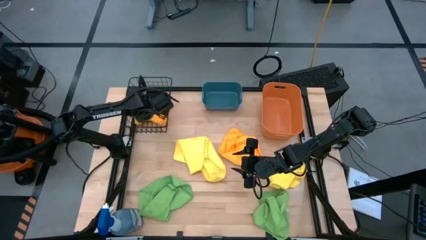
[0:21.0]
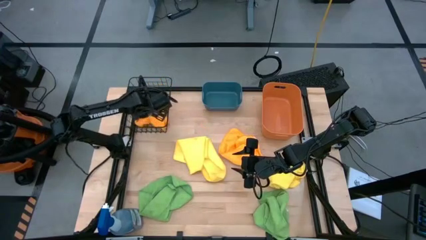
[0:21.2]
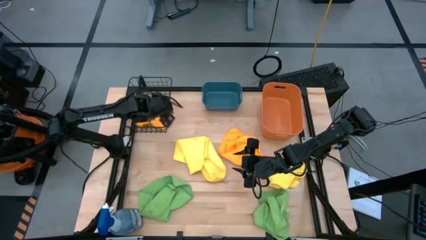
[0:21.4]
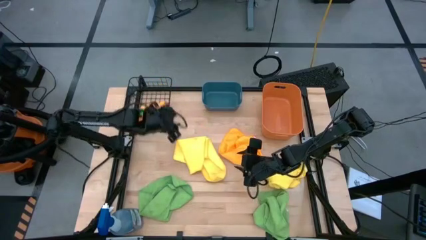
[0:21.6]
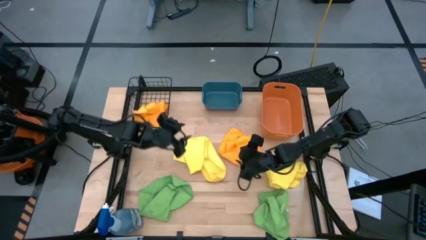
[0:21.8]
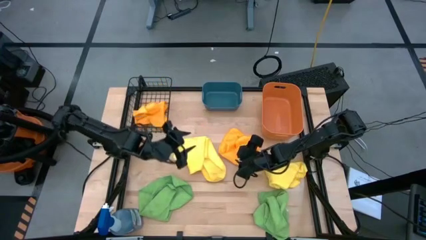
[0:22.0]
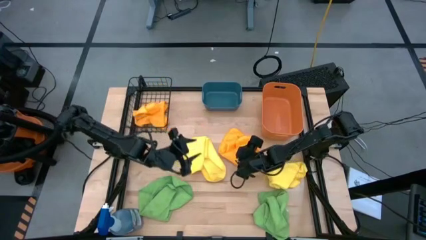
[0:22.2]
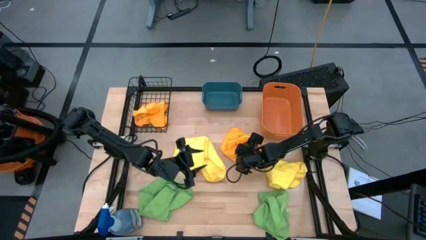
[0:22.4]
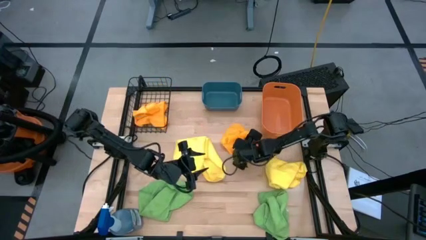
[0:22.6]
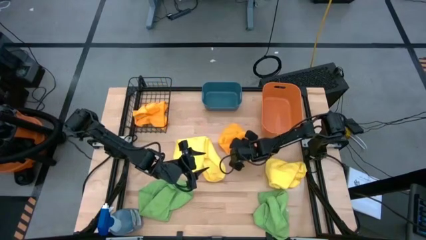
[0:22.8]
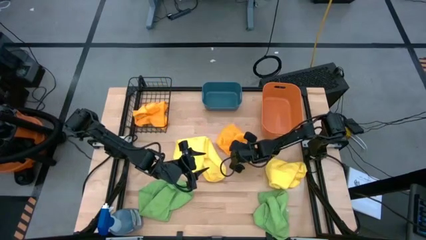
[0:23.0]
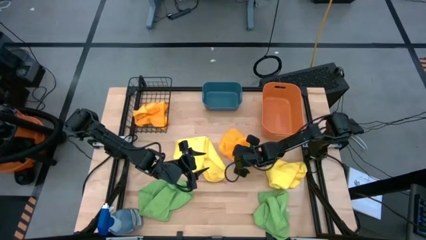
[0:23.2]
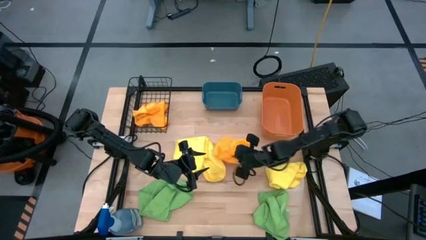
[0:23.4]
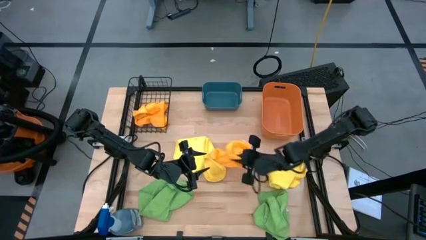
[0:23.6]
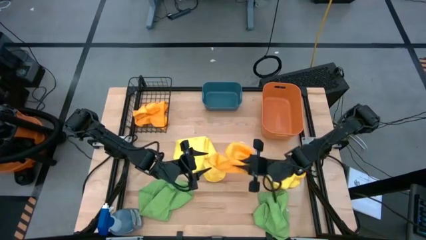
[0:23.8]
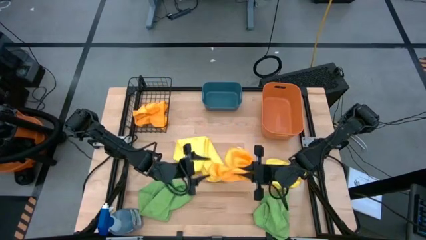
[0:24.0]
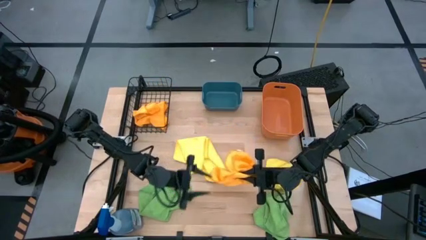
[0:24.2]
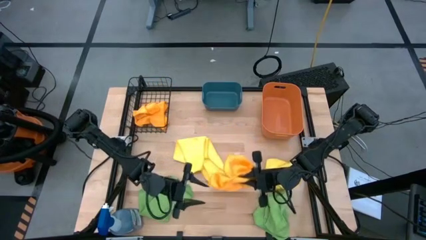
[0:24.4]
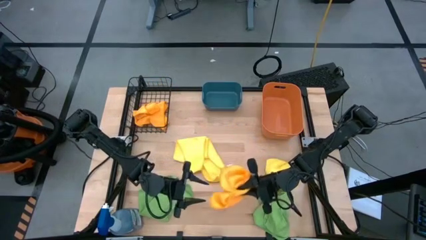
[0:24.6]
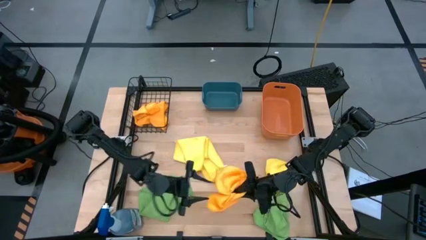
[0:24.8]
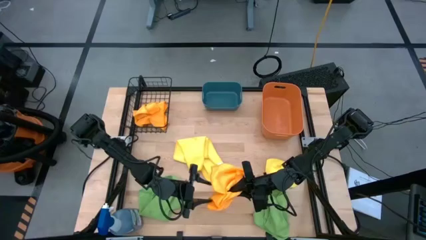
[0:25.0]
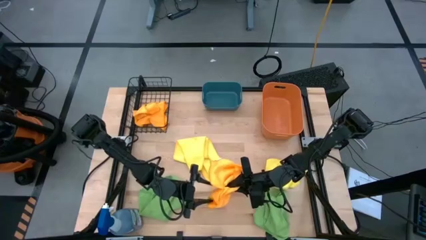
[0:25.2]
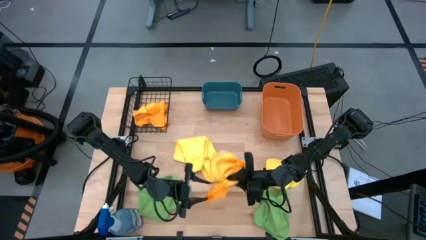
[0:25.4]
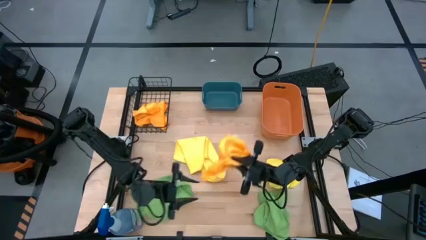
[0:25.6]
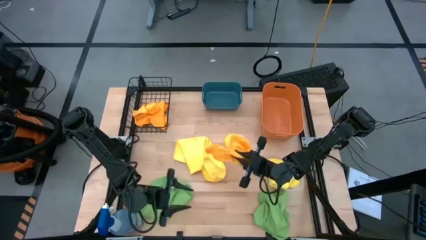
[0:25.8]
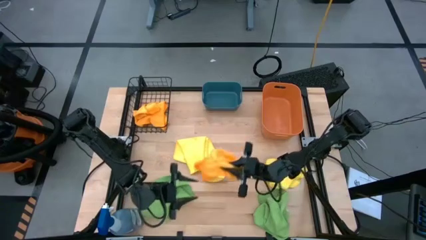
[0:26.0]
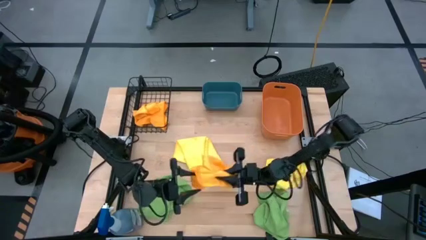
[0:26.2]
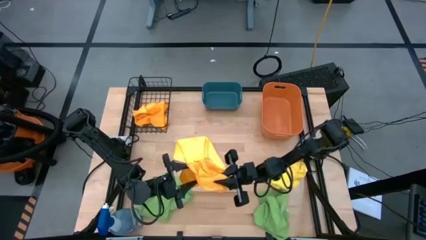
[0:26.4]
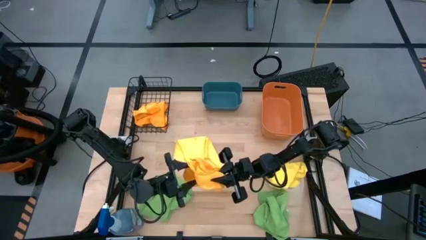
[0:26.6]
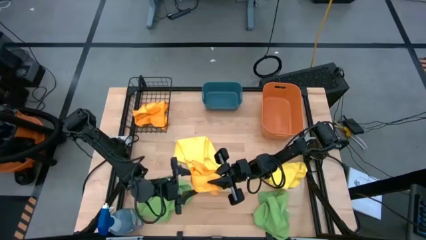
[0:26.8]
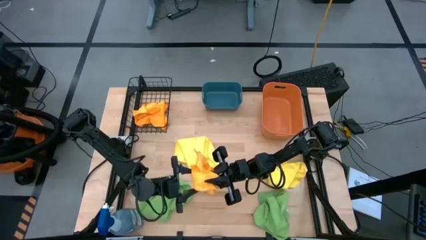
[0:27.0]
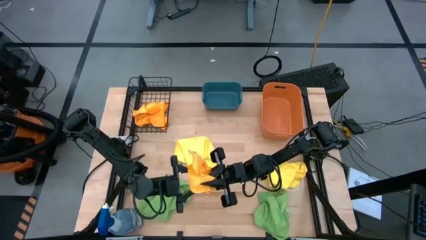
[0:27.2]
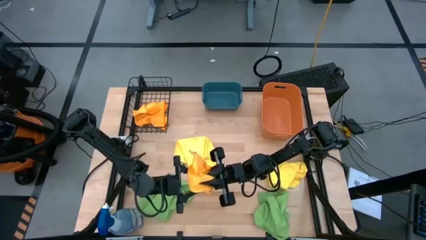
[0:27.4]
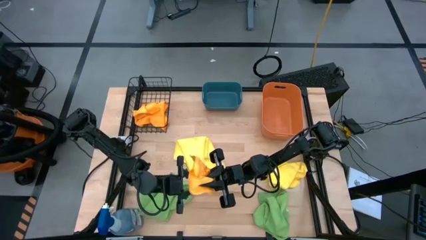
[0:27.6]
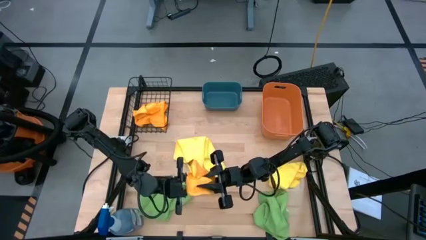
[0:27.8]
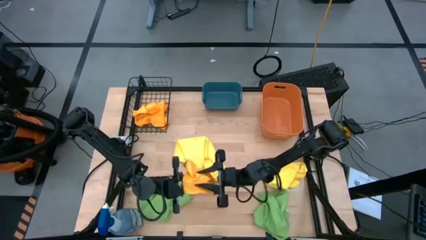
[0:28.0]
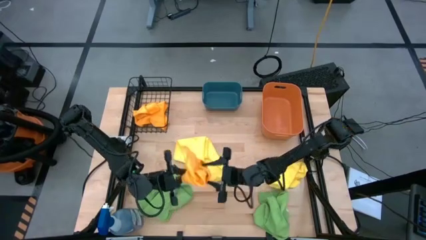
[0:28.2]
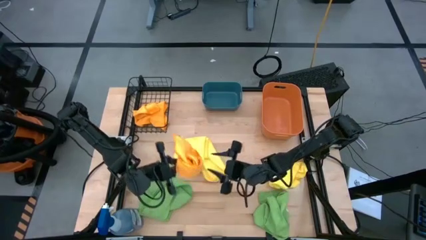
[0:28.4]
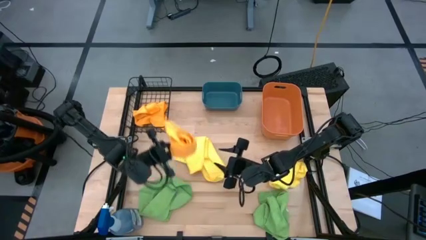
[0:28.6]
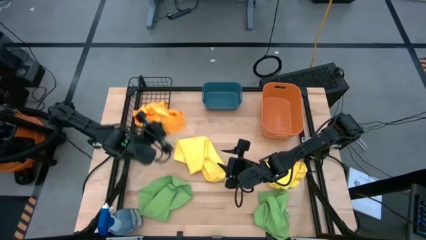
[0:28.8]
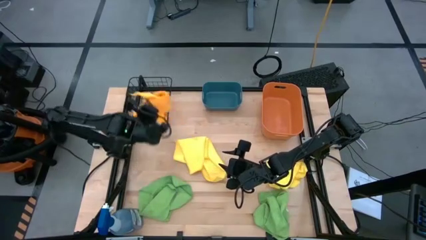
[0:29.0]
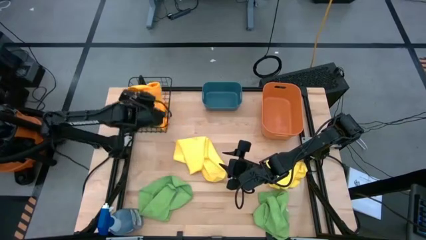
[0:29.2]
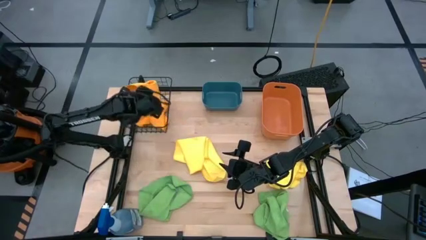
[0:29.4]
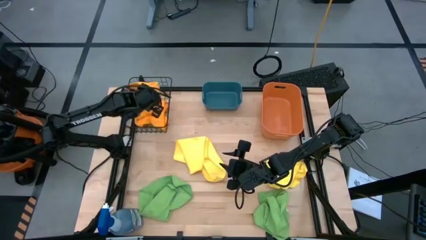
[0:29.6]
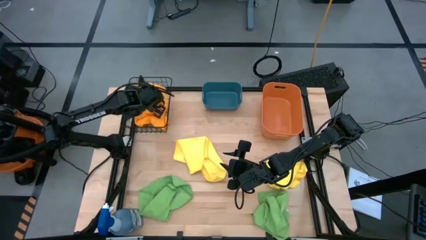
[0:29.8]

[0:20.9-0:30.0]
Task: Sort microfiber towel by color & place in baskets
Put the orange microfiber cloth into the black wire basket

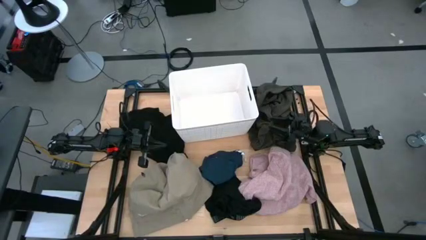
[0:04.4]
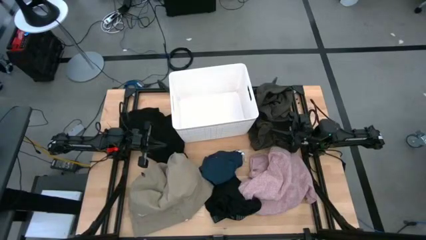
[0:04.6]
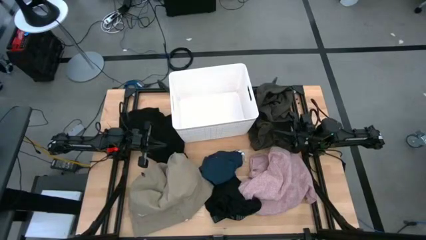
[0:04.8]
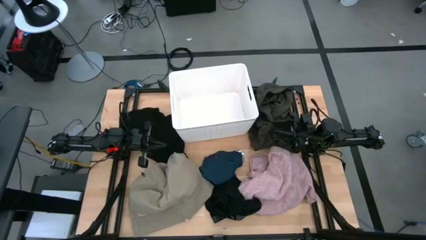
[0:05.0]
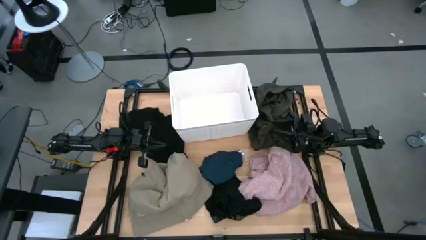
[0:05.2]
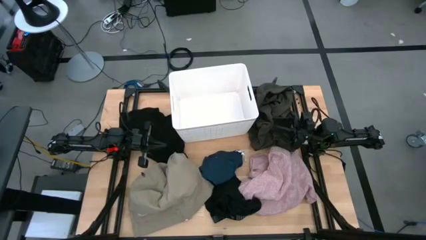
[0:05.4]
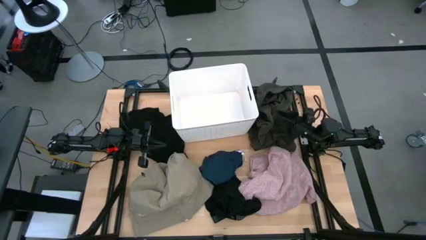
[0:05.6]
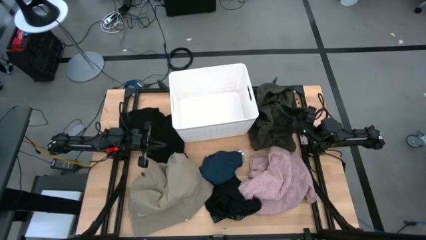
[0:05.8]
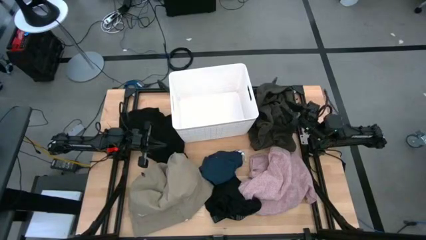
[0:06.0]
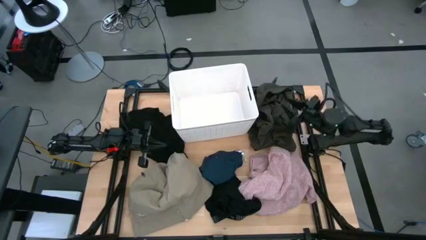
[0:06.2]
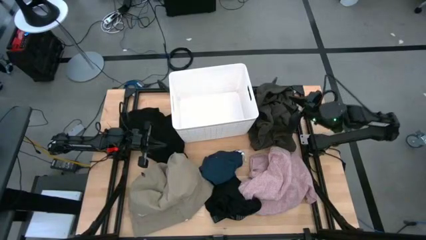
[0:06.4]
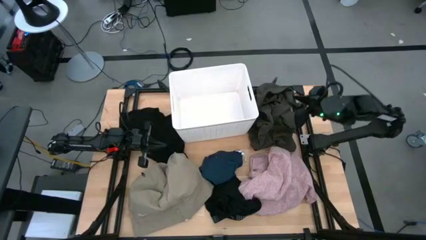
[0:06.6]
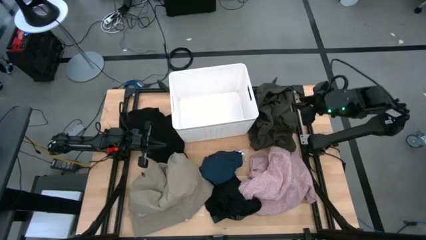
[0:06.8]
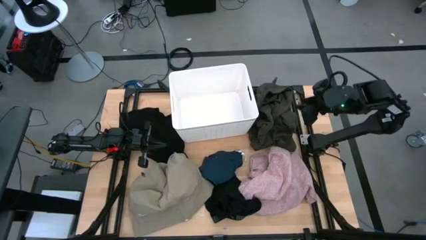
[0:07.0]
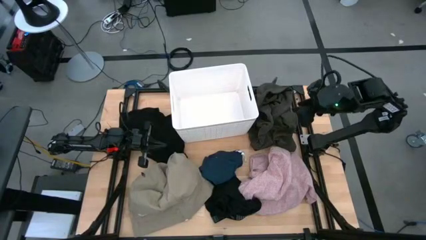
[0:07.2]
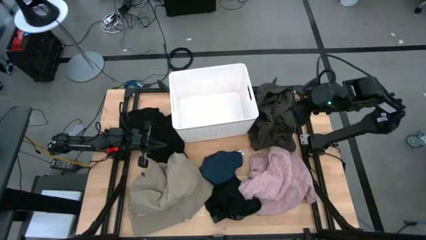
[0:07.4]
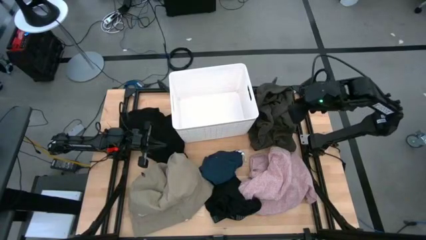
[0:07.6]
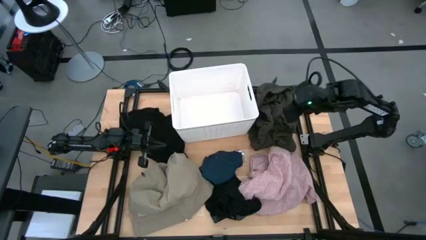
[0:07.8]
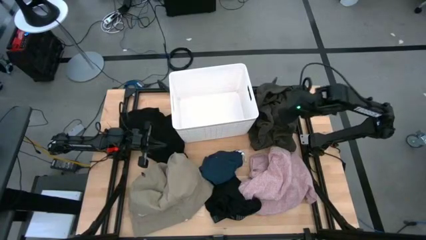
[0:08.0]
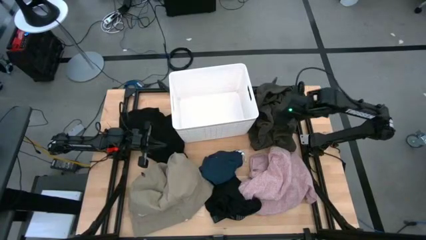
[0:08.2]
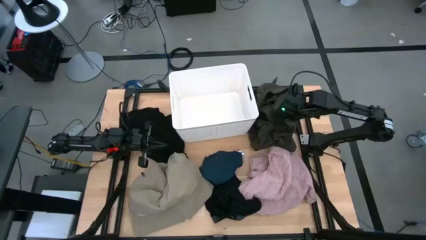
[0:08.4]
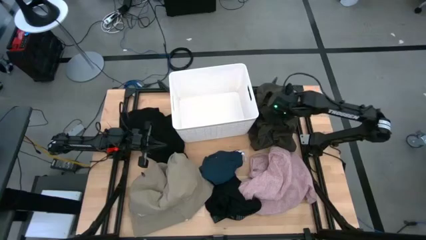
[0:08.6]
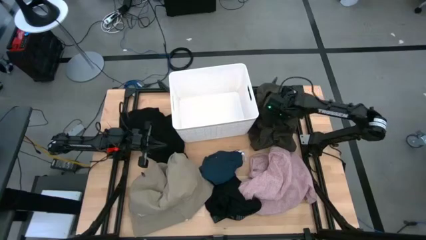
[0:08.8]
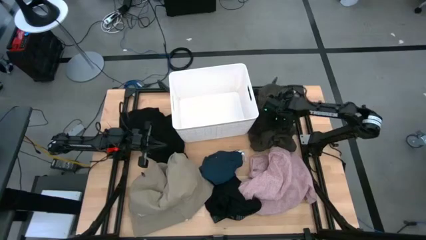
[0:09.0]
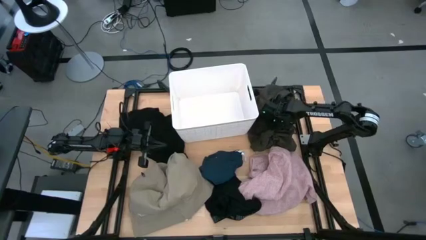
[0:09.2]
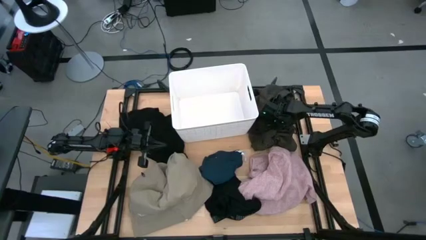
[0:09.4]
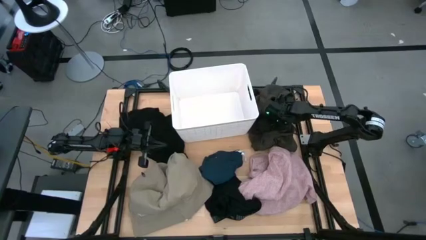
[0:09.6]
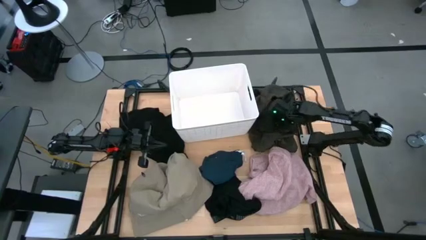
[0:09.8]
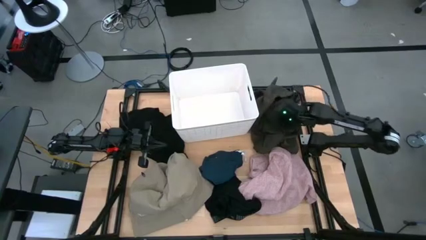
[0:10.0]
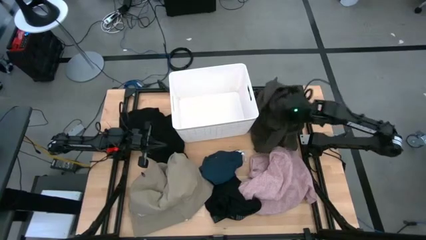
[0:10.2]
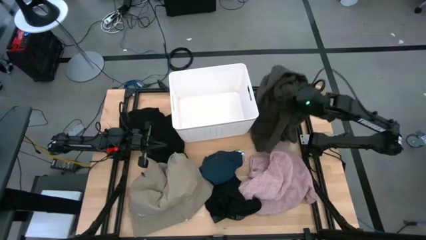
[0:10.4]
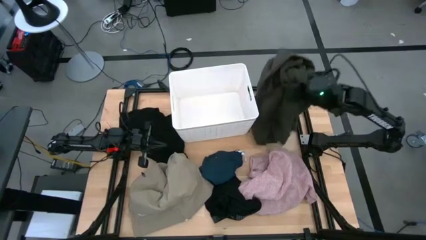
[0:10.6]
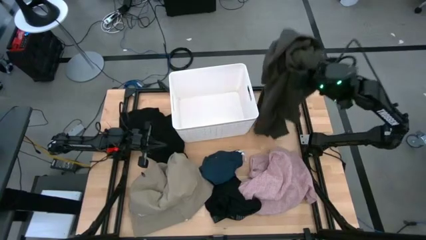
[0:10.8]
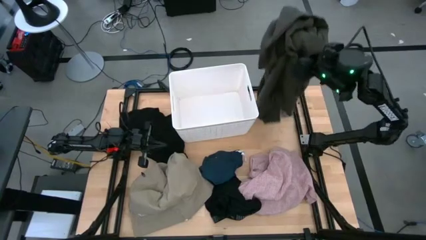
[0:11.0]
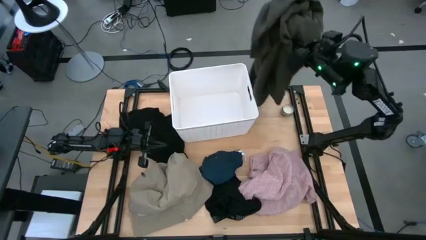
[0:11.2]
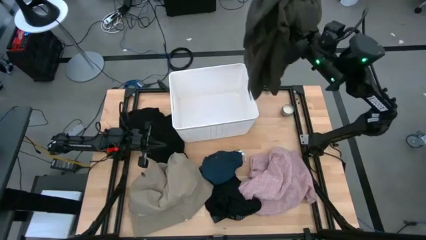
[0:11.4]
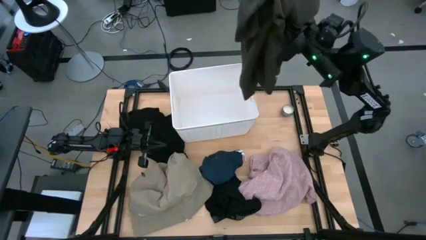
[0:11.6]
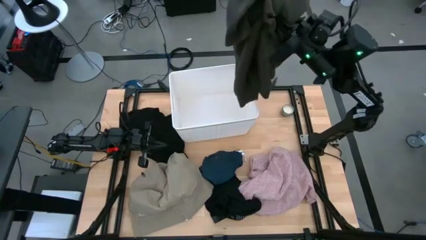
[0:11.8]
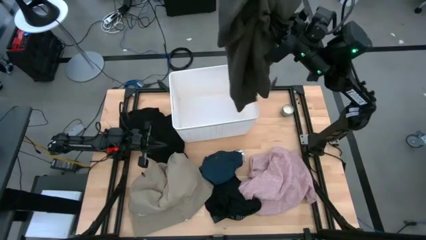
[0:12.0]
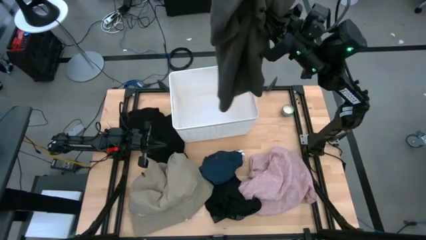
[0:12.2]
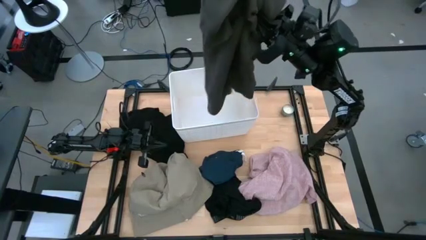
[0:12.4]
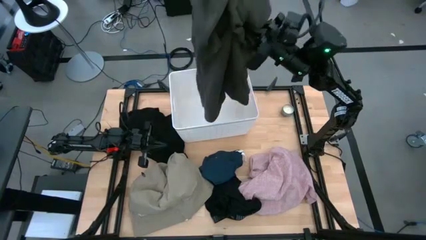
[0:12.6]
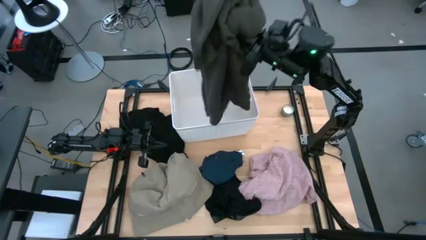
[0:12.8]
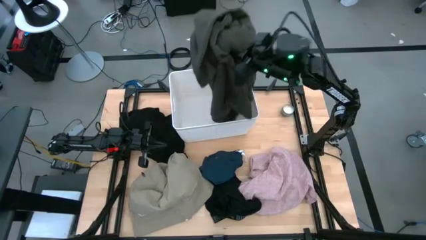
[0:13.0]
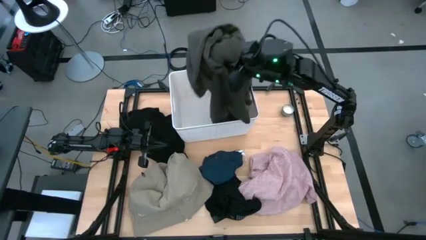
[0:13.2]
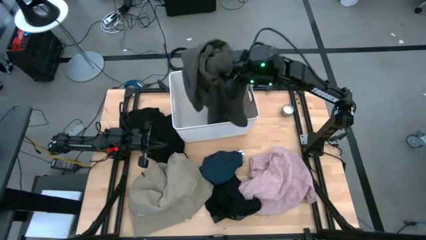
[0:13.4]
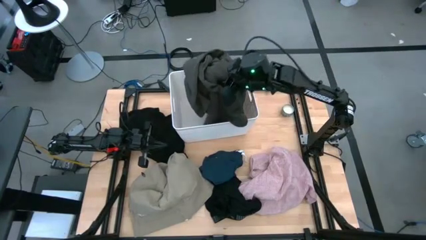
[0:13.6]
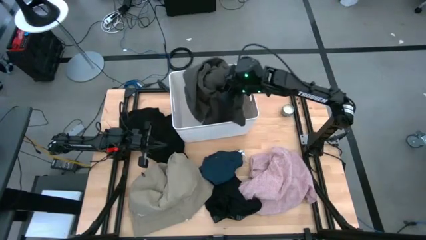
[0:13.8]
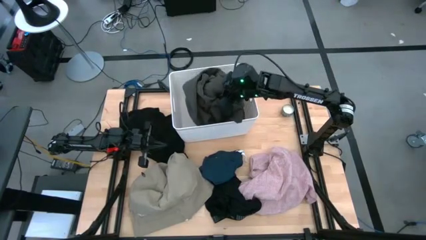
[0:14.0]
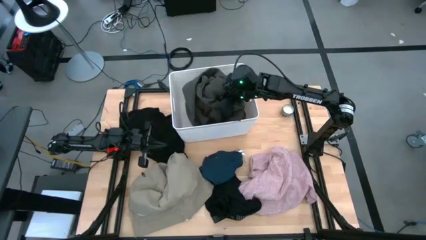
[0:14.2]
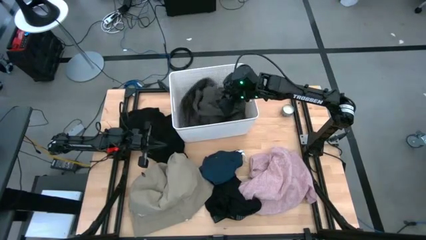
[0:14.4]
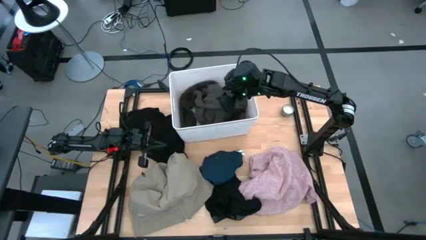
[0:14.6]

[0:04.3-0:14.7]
Task: Sort clothes
Put the dark green sweater into the white laundry bin
